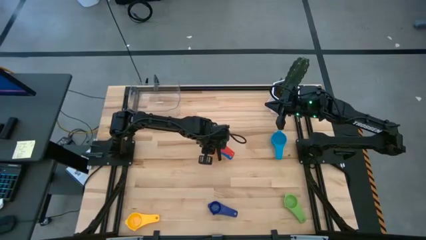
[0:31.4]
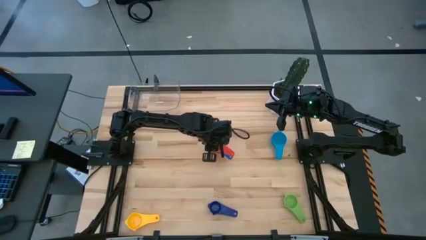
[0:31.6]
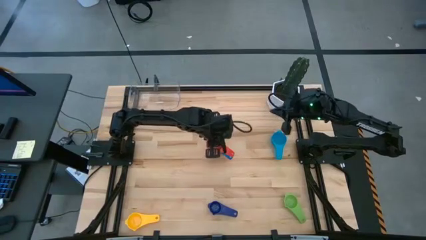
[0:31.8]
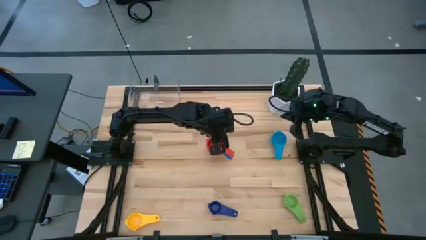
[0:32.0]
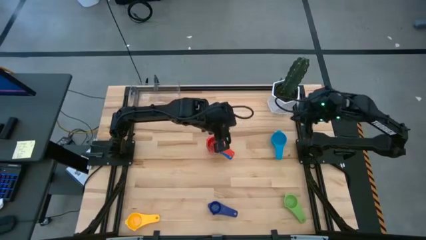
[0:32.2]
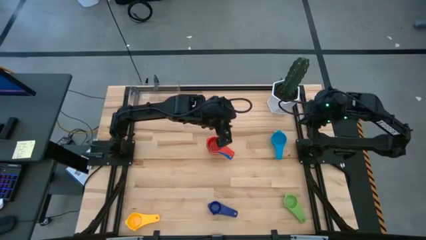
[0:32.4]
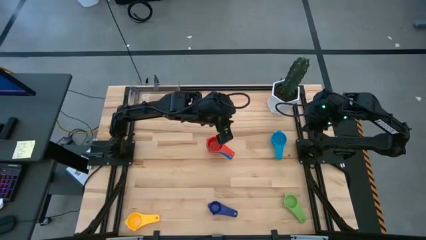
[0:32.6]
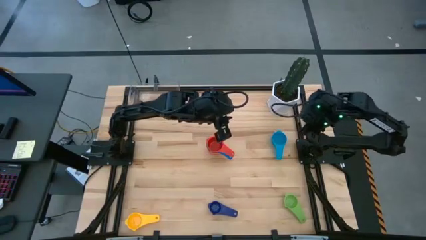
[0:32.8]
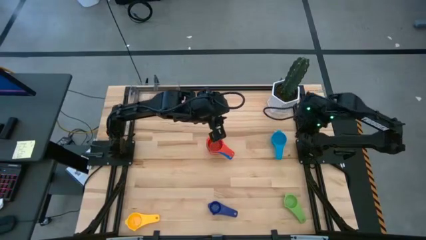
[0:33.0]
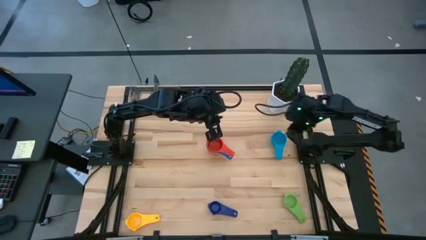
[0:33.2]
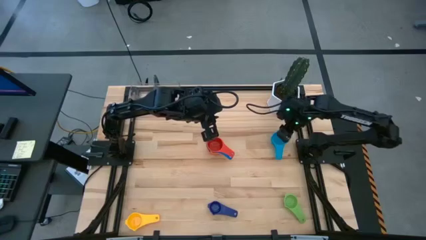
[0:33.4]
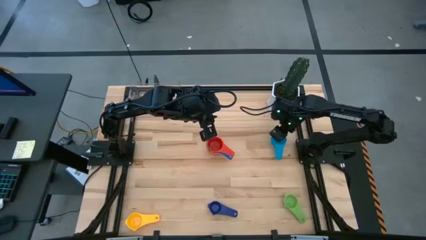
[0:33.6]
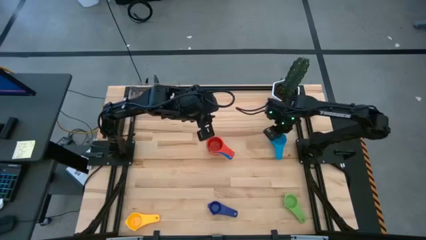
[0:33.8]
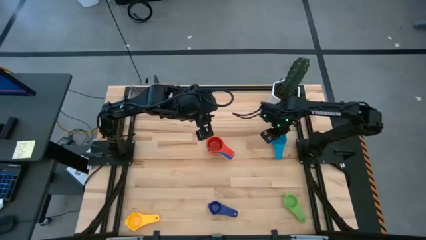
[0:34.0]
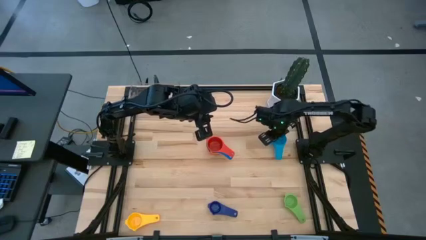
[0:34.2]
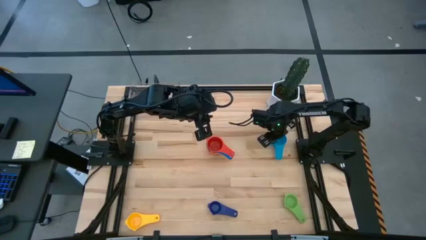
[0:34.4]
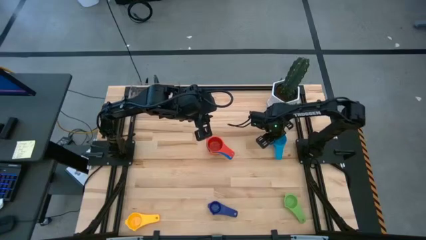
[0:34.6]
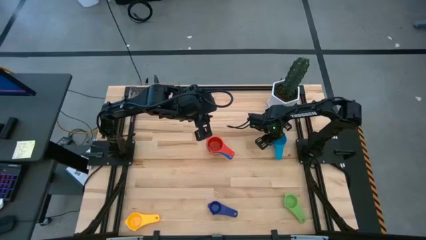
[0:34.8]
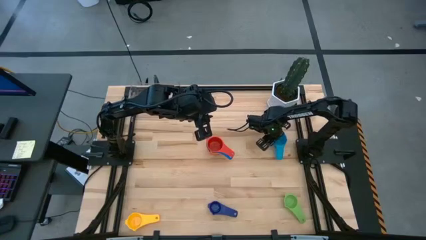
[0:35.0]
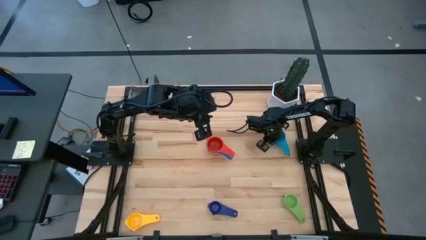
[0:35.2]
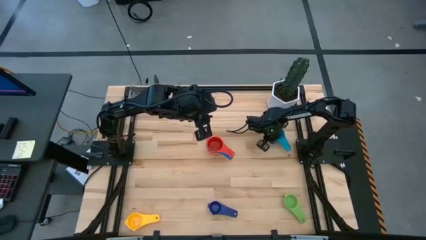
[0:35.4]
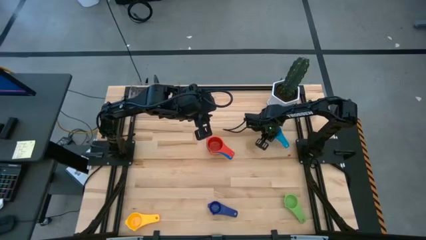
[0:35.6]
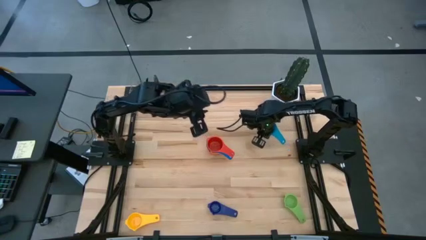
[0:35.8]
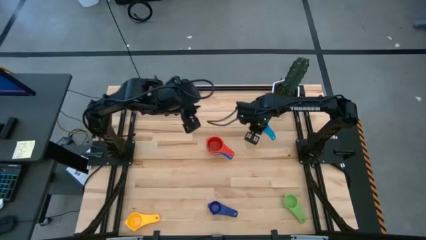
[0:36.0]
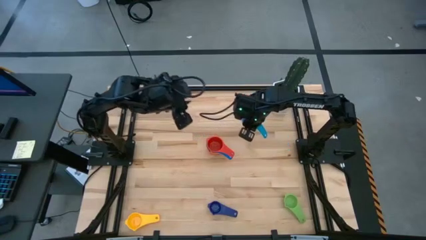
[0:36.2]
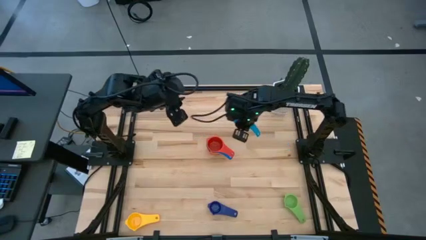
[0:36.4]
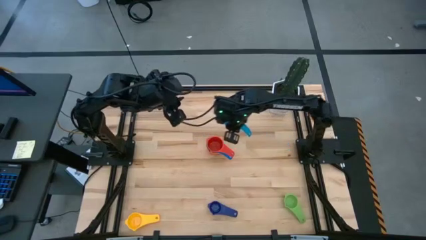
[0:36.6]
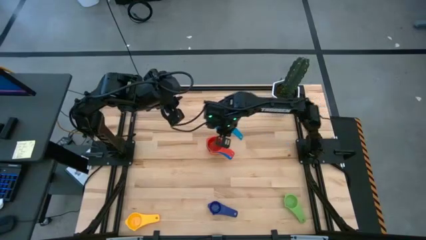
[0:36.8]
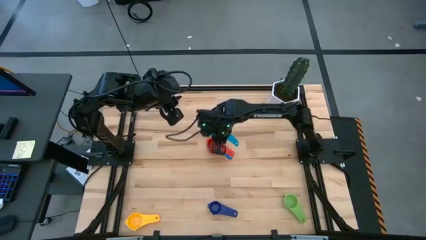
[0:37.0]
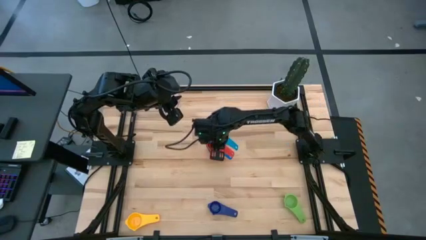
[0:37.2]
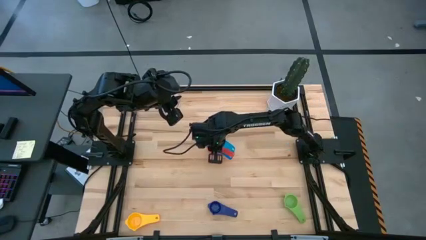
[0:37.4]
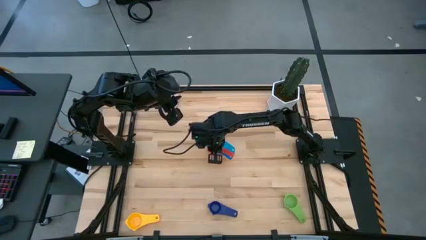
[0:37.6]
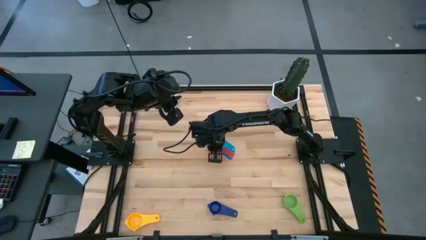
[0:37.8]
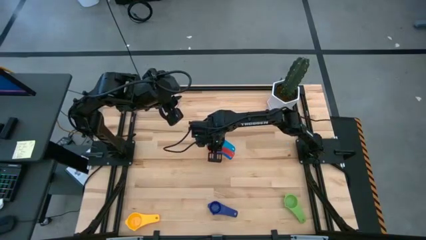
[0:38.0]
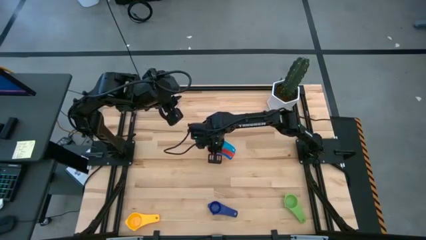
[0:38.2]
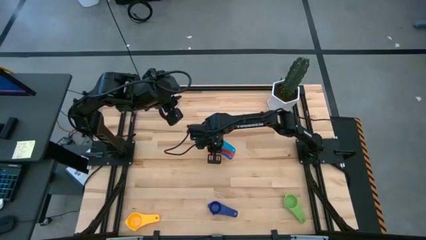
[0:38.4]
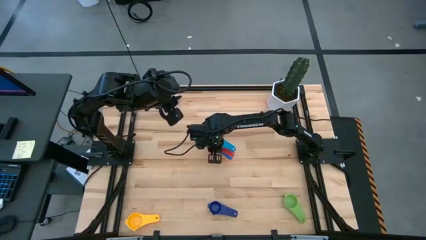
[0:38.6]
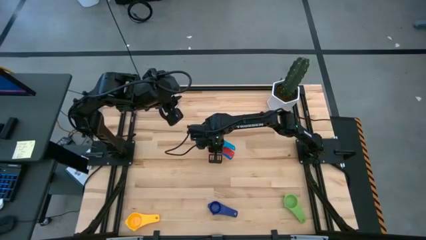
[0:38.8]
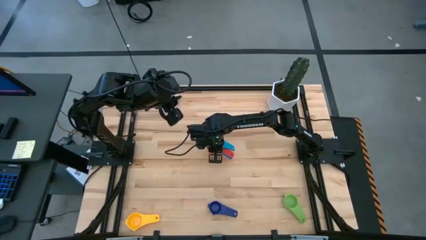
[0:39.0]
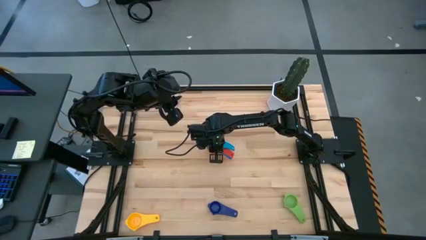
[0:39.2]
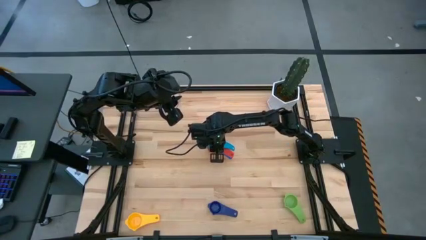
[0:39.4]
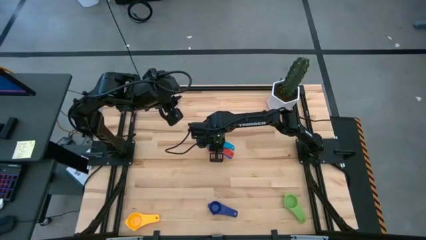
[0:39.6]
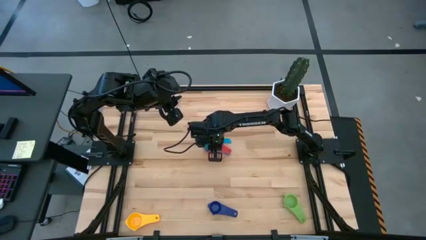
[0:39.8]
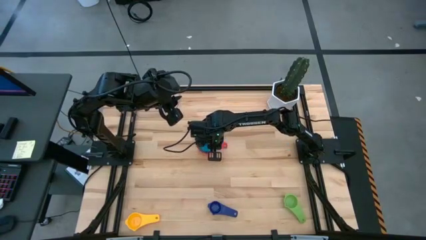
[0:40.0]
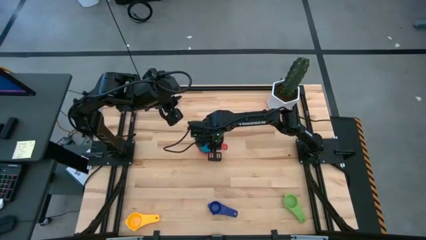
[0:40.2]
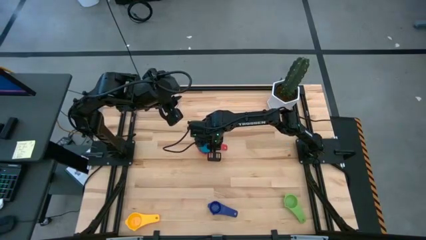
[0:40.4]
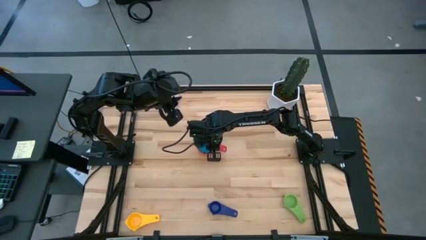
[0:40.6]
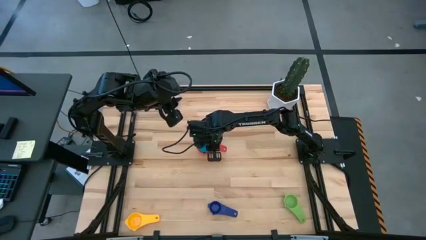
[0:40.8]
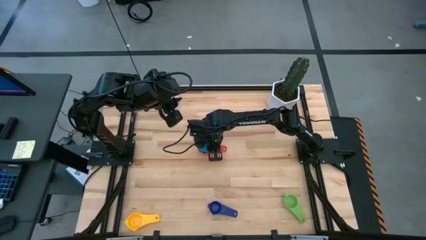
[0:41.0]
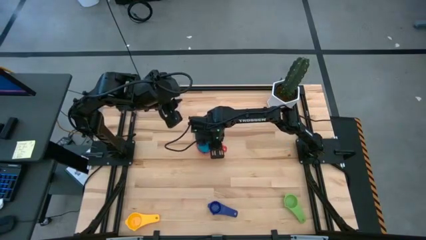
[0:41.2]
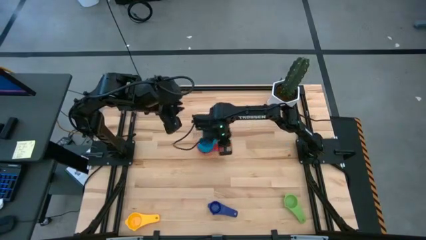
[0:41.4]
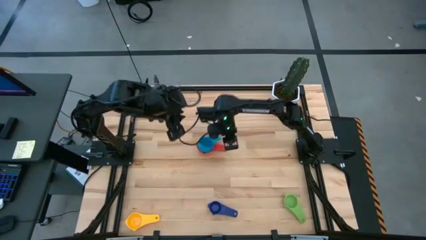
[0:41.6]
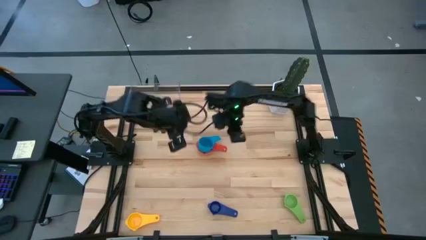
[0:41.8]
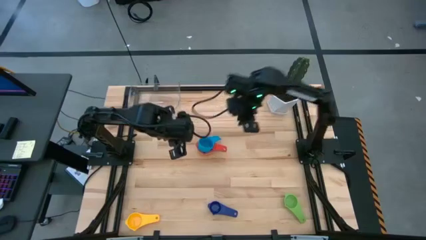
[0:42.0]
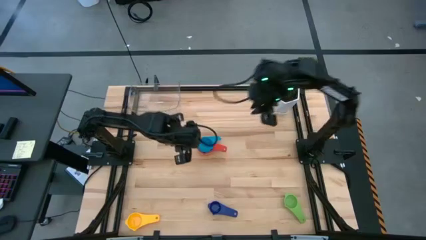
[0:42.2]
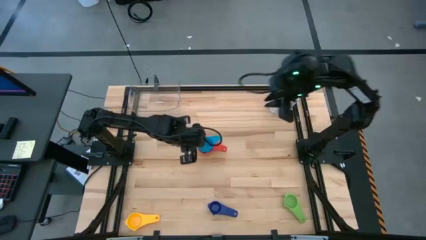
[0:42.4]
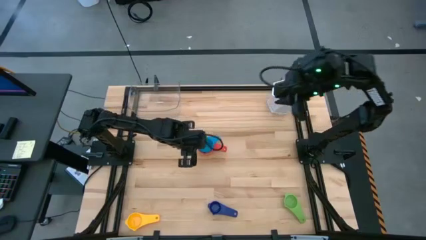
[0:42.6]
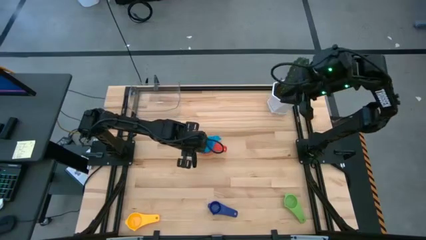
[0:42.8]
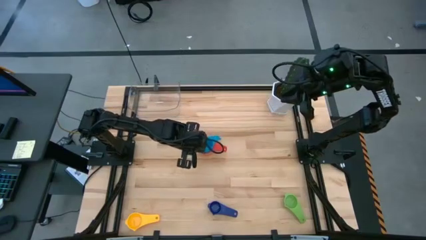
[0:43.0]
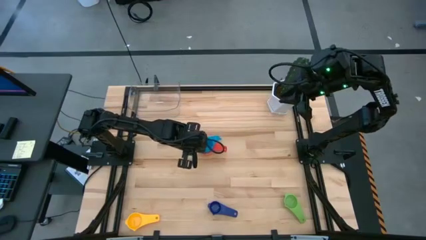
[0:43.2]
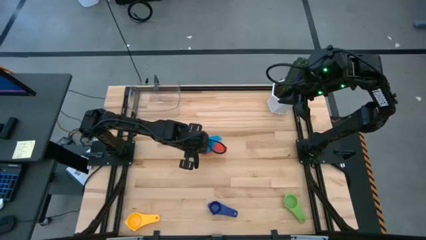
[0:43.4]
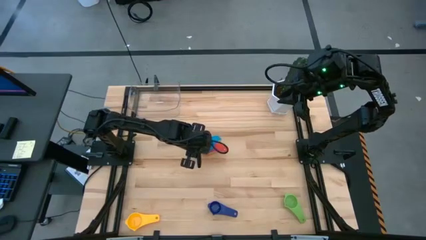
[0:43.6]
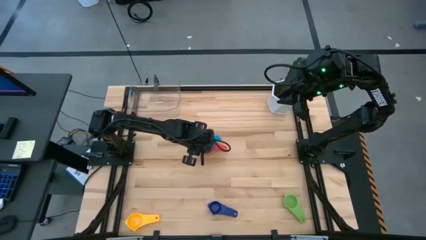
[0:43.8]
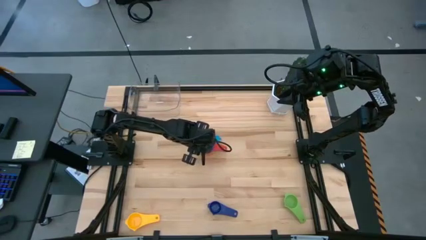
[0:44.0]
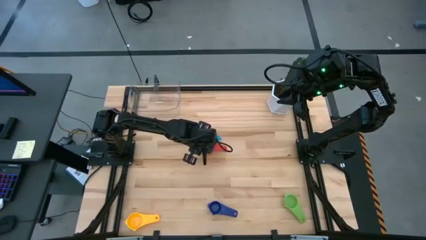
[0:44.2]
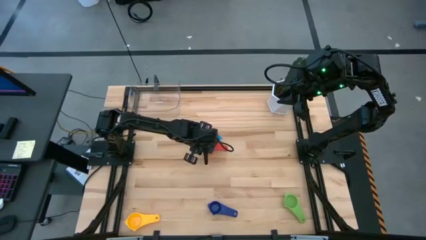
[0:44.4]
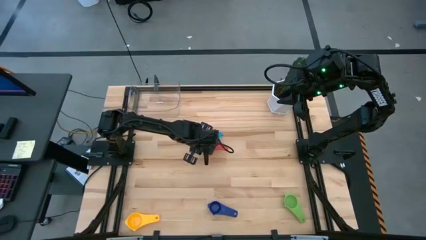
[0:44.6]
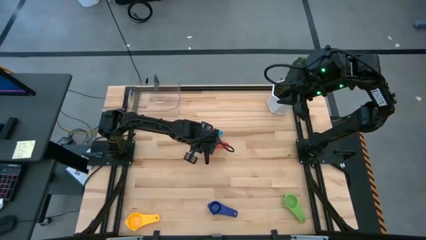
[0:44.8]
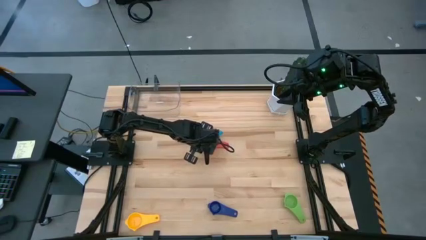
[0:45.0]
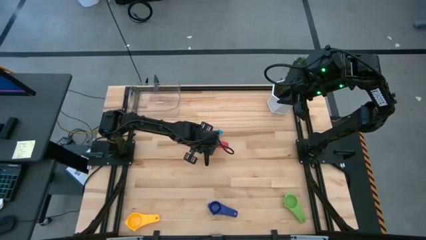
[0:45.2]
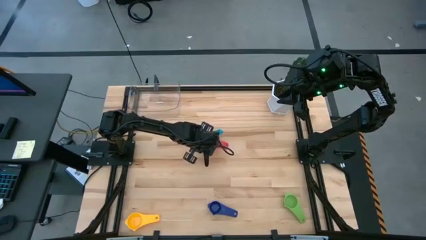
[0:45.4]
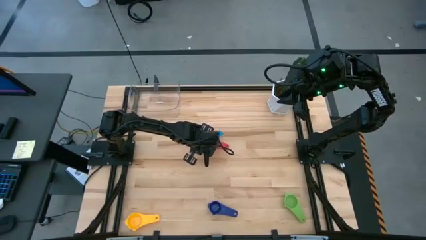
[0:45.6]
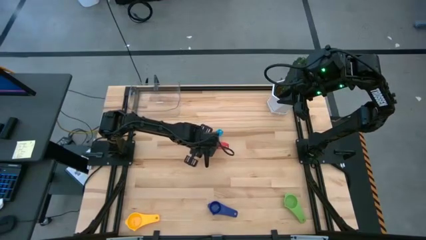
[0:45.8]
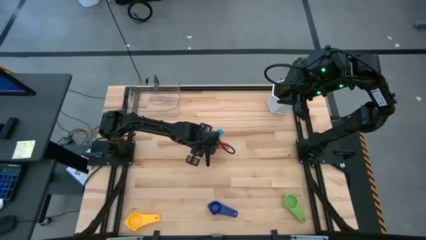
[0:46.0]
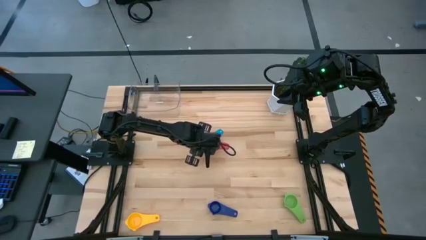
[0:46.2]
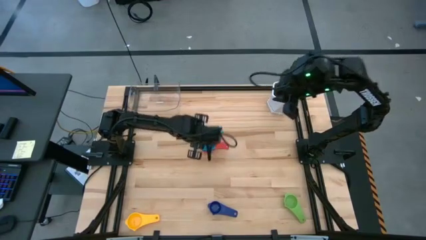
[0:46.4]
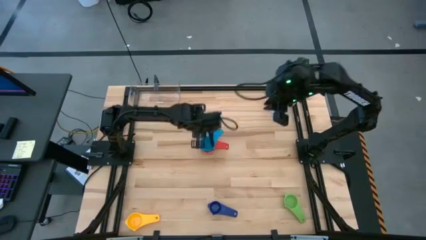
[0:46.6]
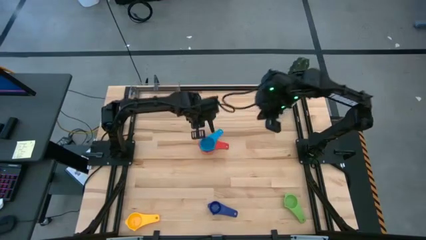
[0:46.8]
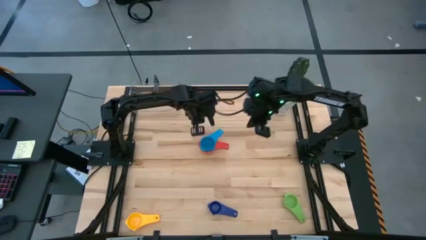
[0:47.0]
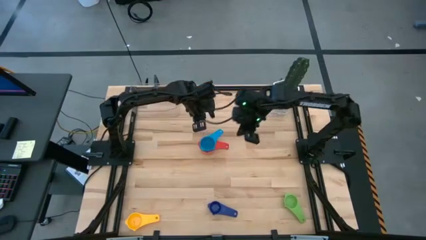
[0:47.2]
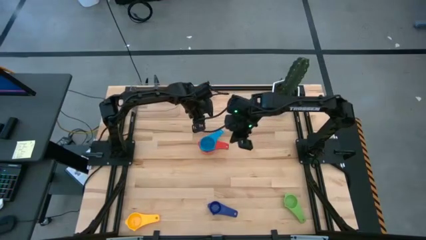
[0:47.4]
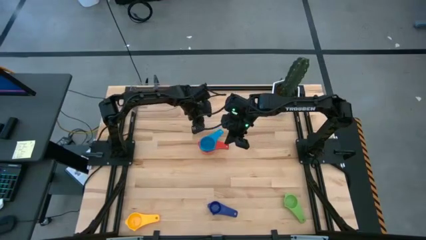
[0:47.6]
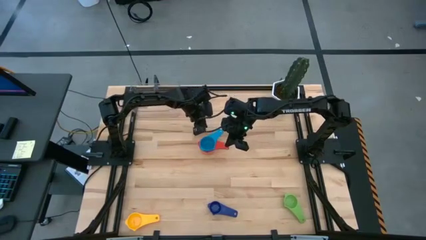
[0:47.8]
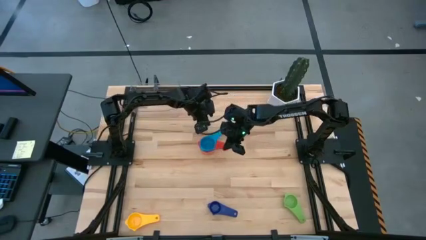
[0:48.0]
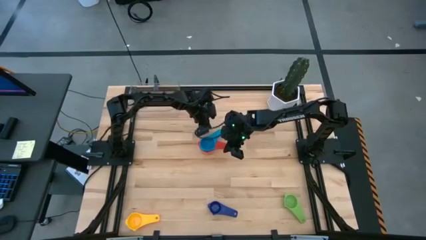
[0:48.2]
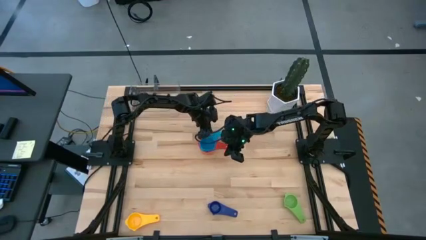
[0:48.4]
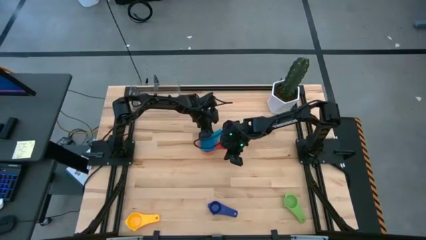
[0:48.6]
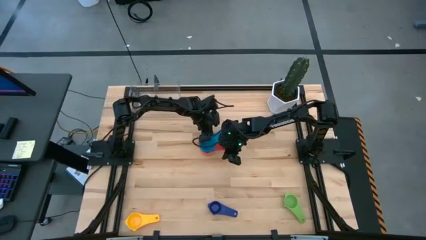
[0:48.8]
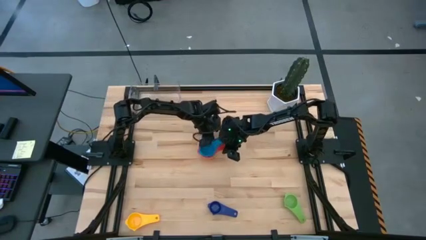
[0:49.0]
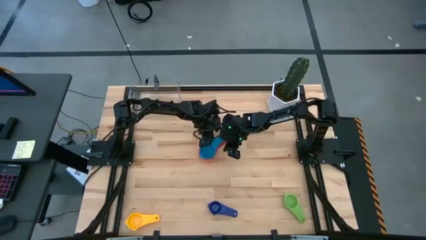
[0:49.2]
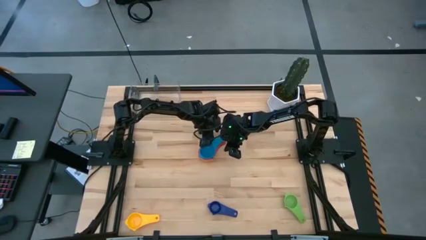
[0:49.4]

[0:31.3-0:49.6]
Task: Nest measuring cups in basket
Stack the light blue nest measuring cup on top of the red nest measuring cup
